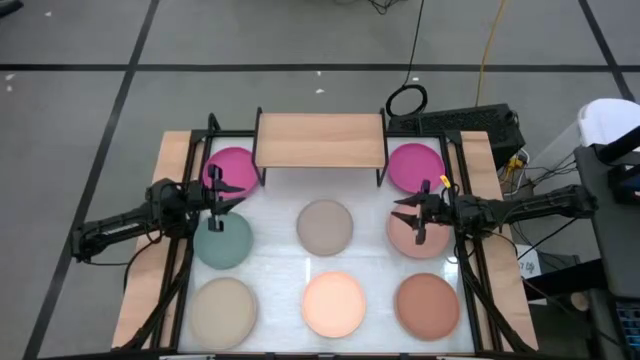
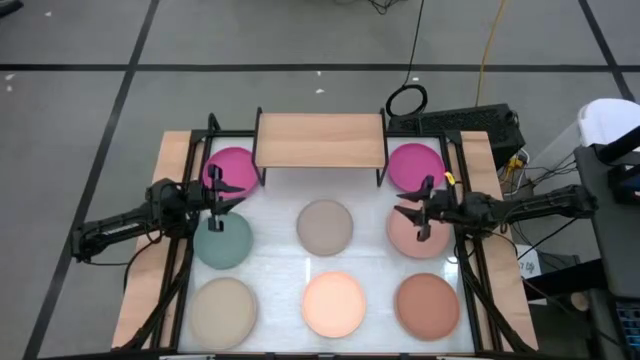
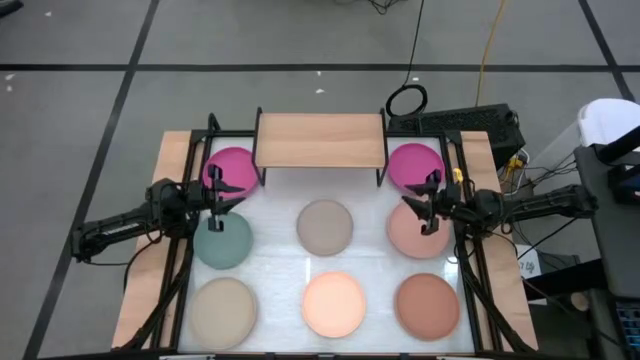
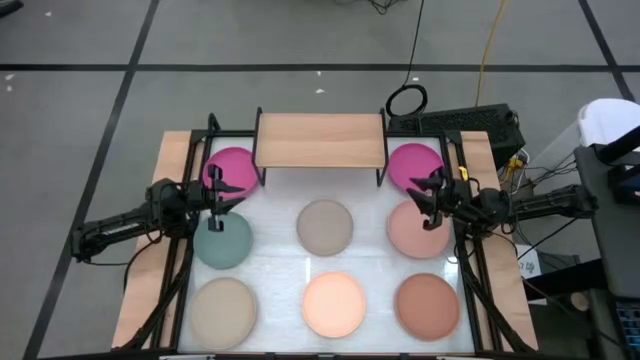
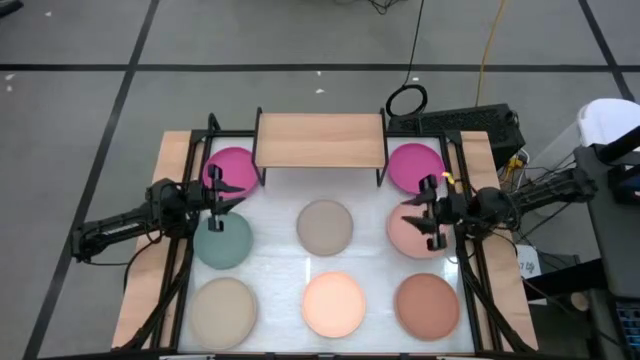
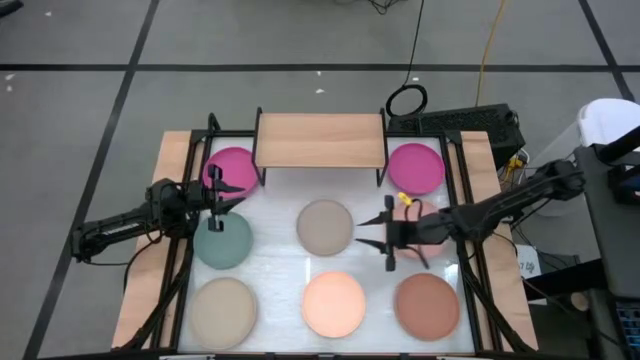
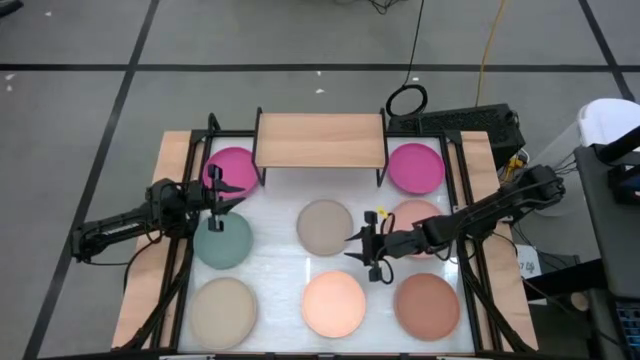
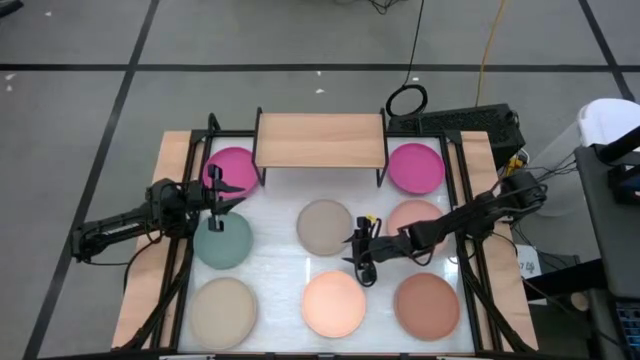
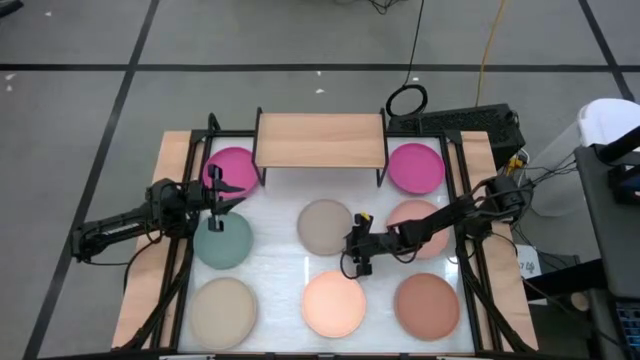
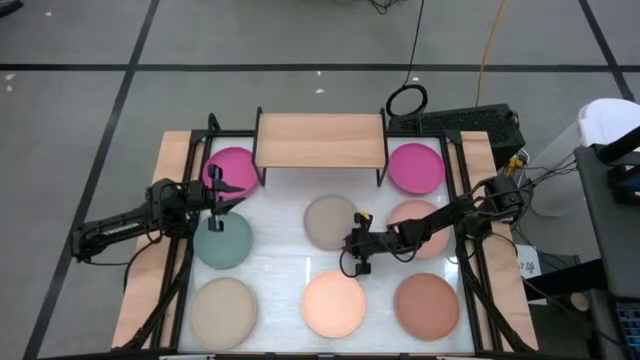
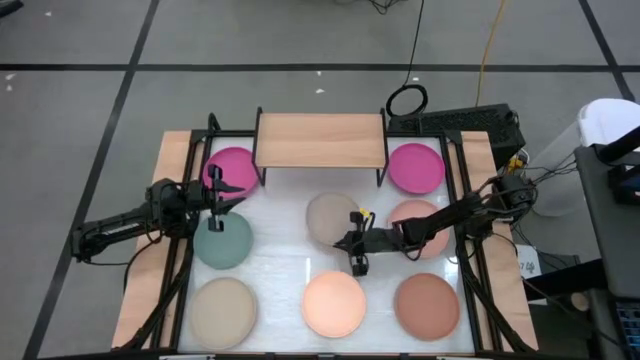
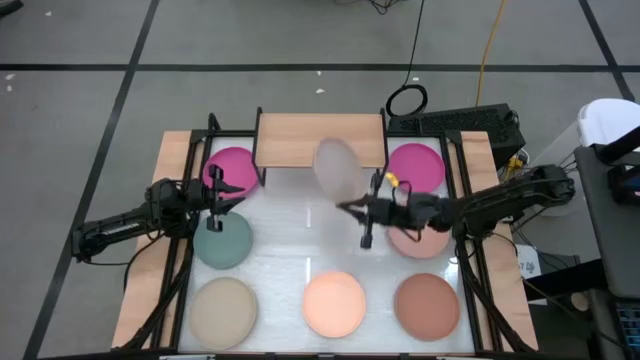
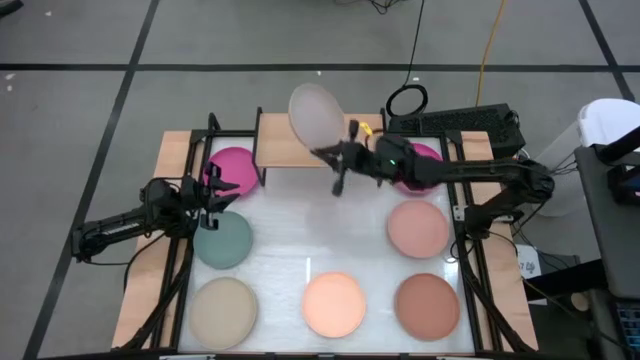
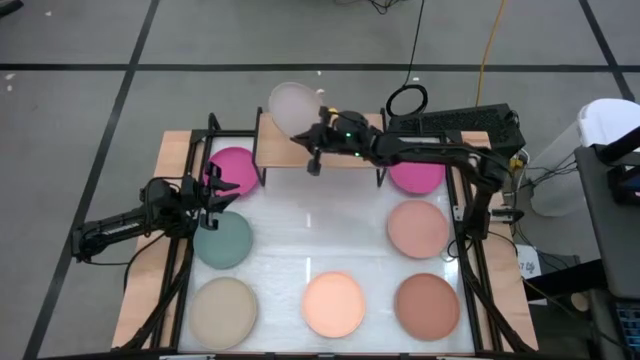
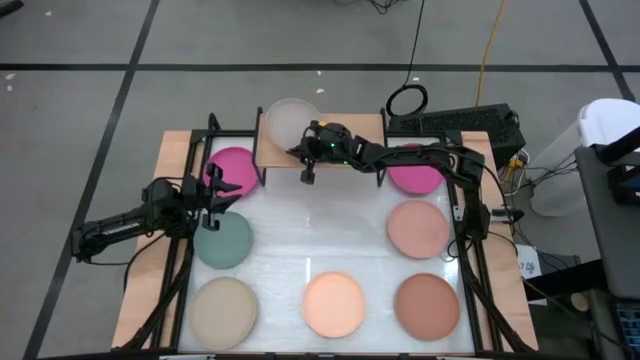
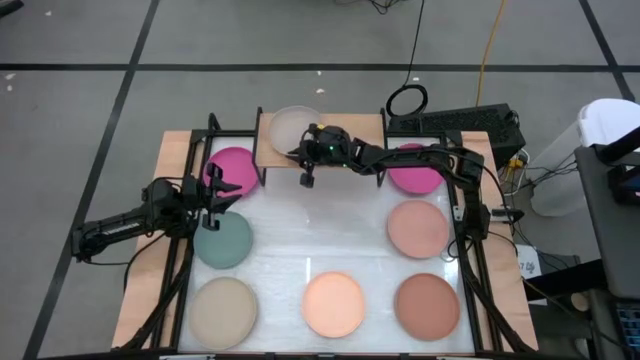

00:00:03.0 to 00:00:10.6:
Task: Place and stack plates onto a shelf
Put the gray plate on the shelf

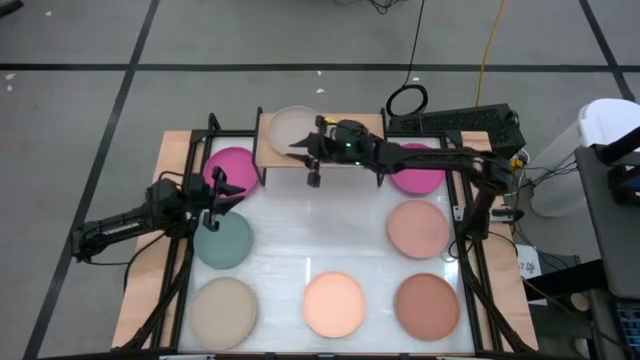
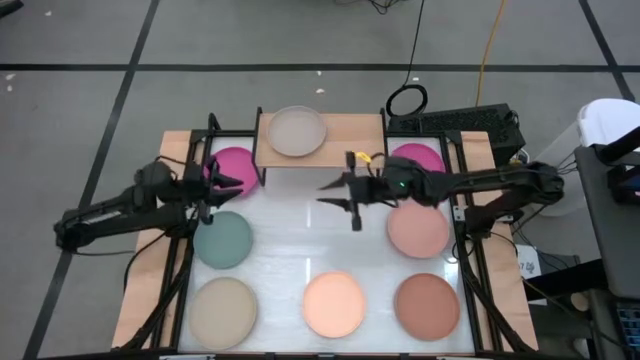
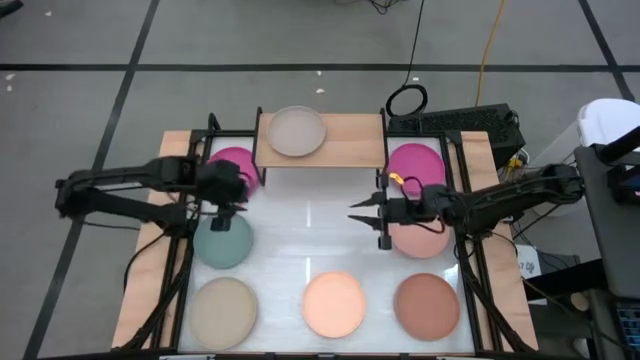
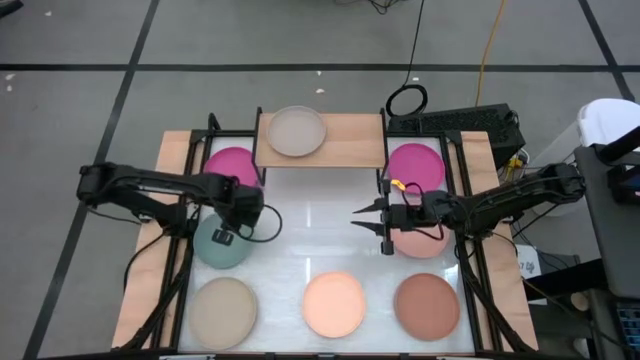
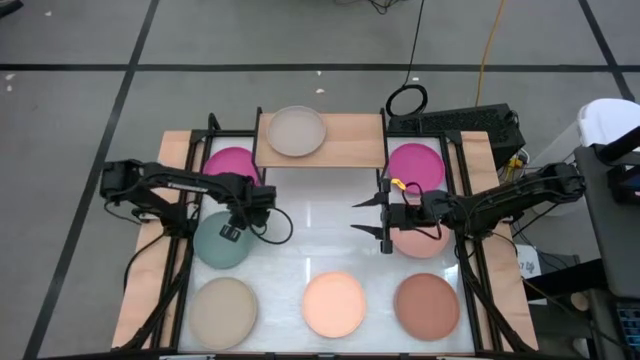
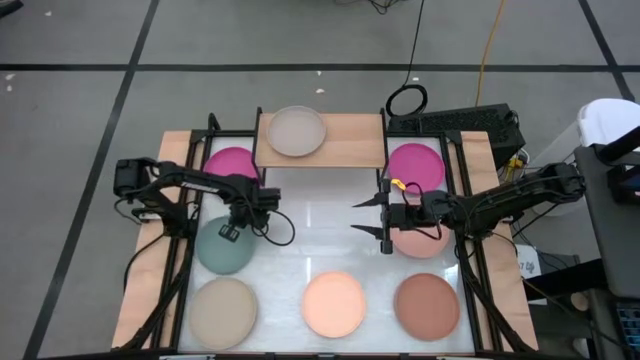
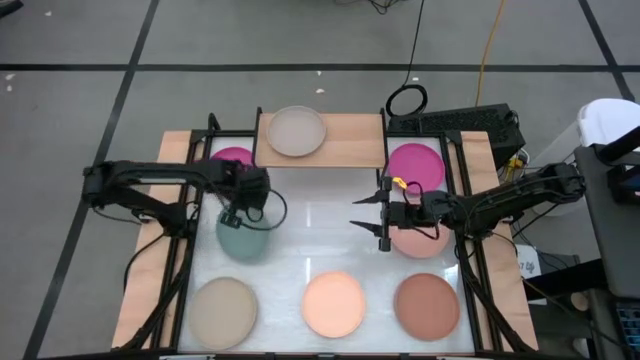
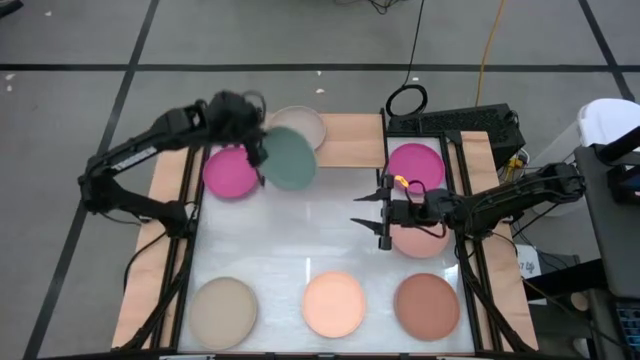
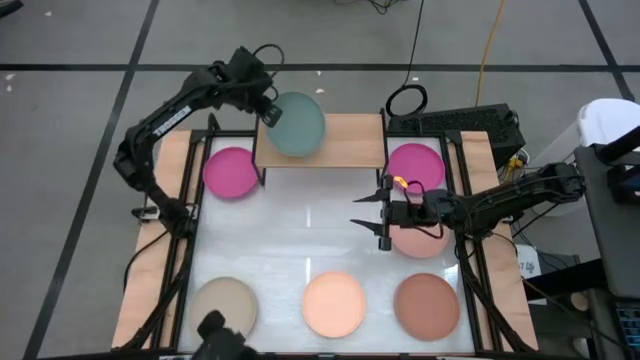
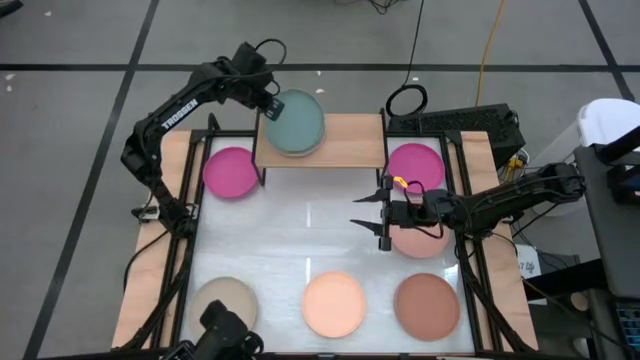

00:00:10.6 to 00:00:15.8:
Stack the light green plate on top of the gray plate on the shelf

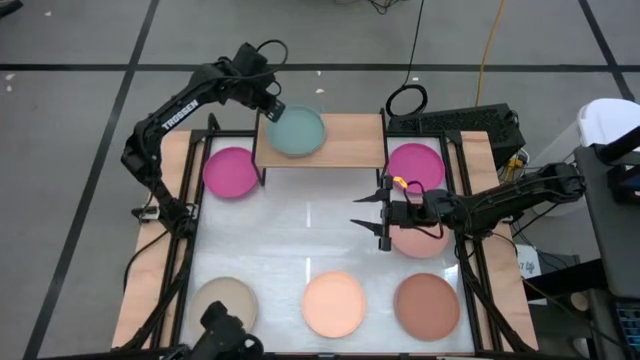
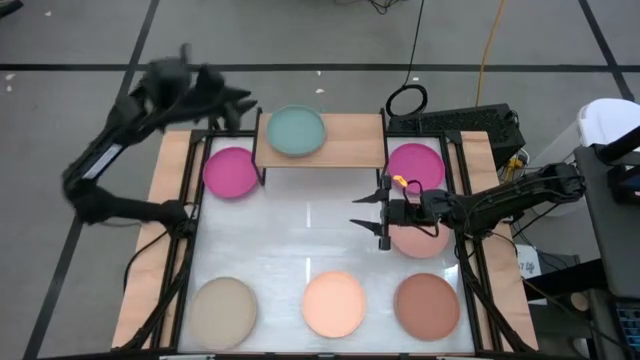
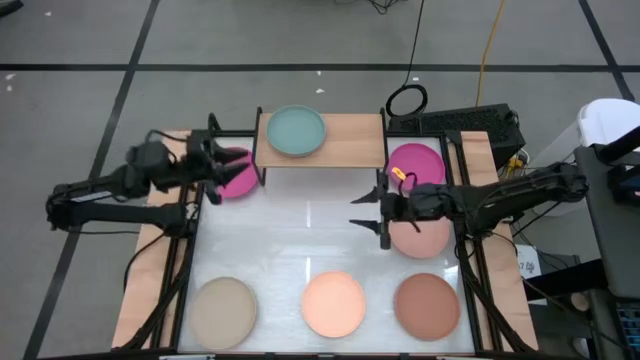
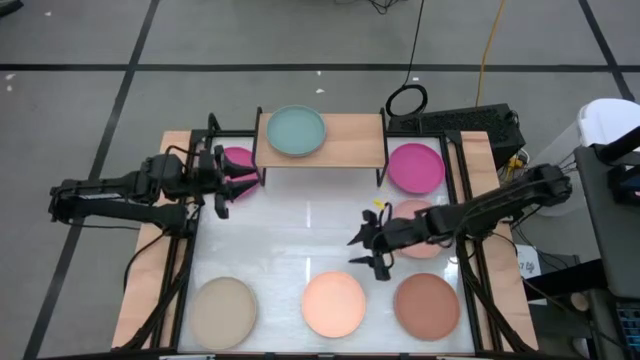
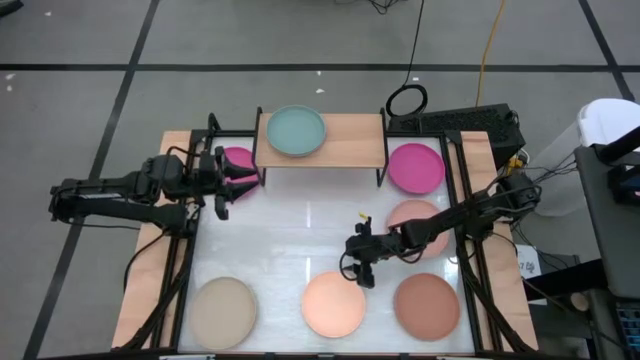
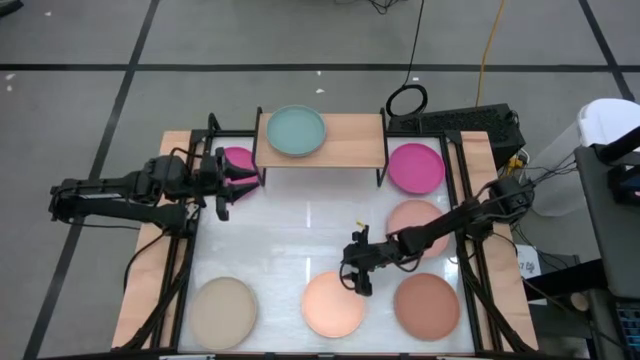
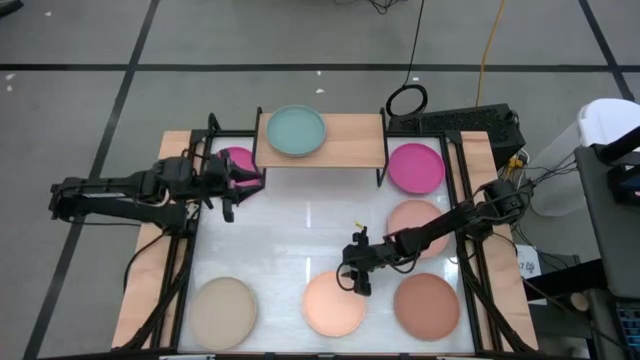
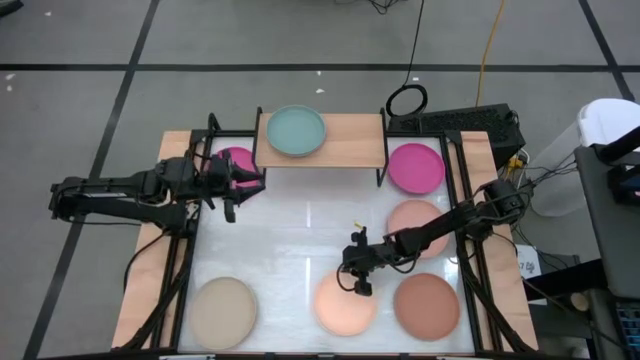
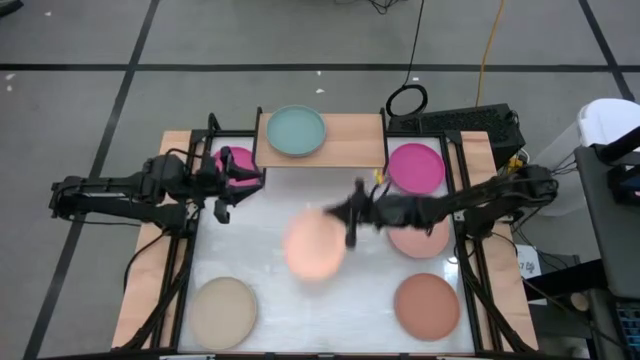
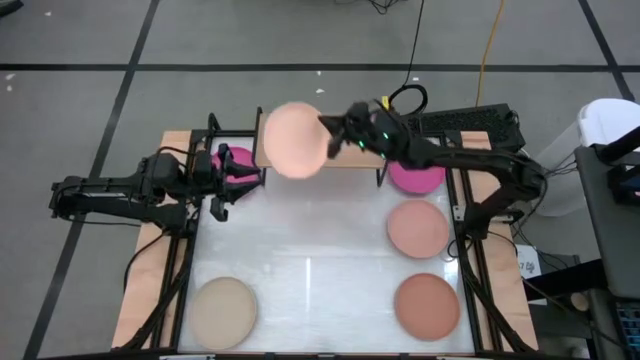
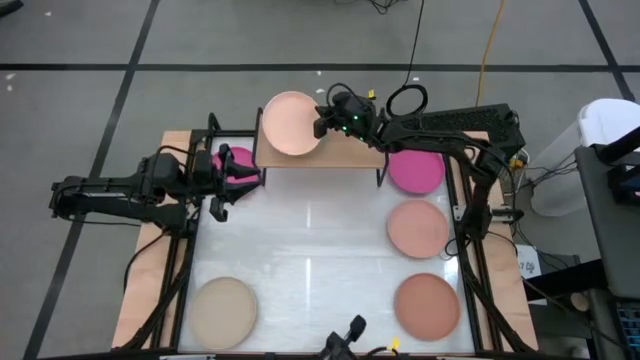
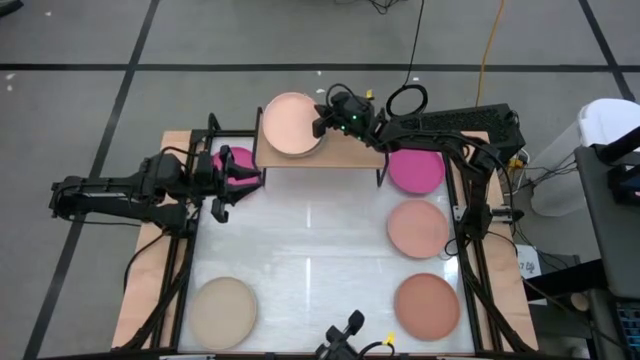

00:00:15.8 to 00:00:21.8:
Stack the light orange plate on top of the light green plate on the shelf

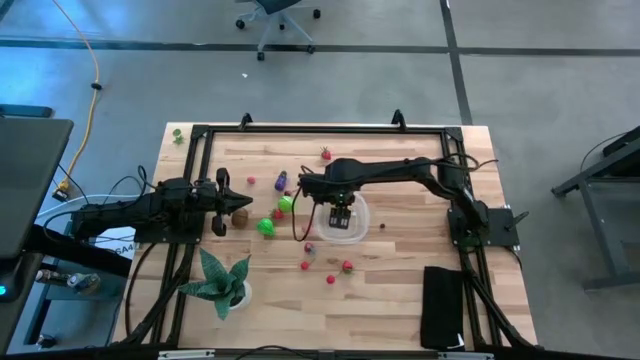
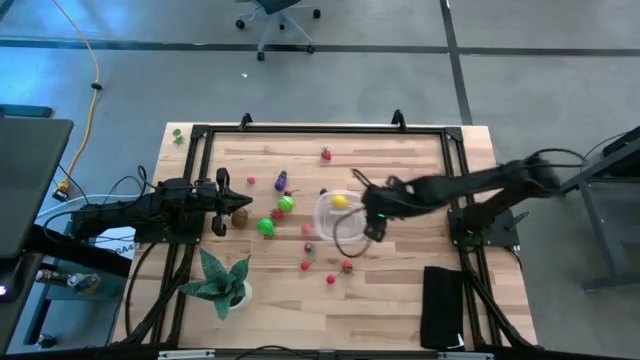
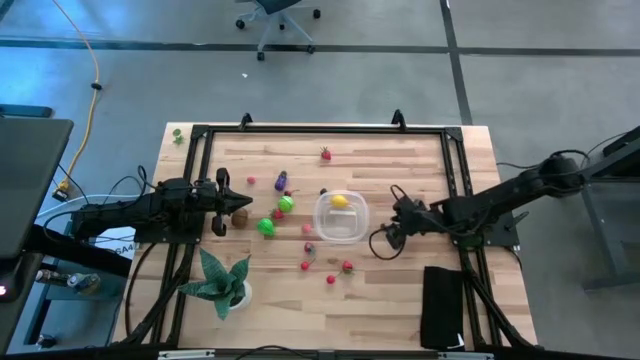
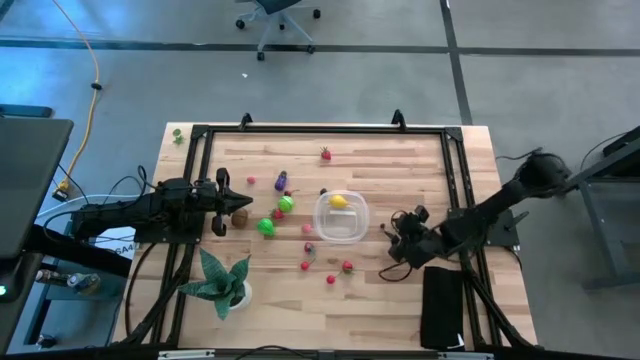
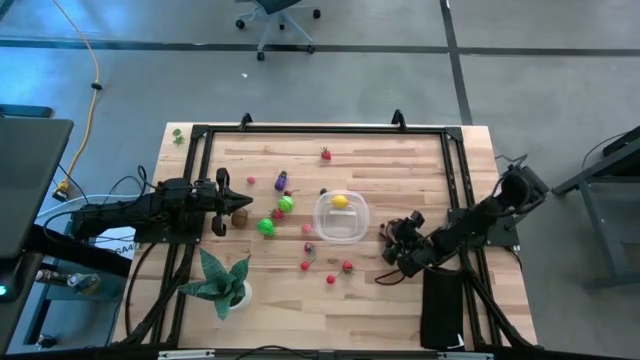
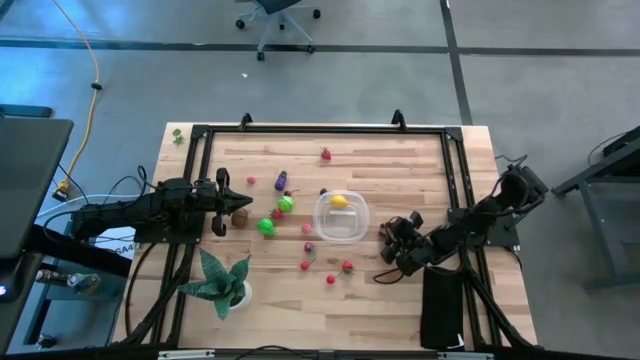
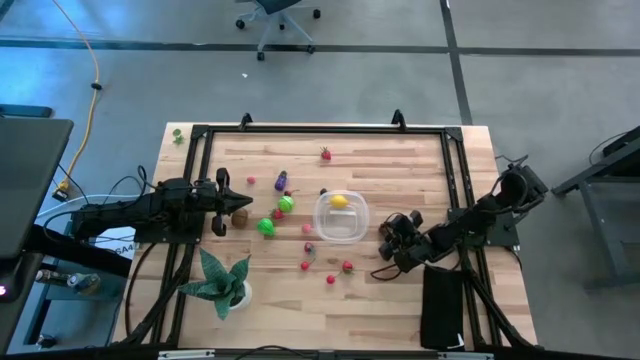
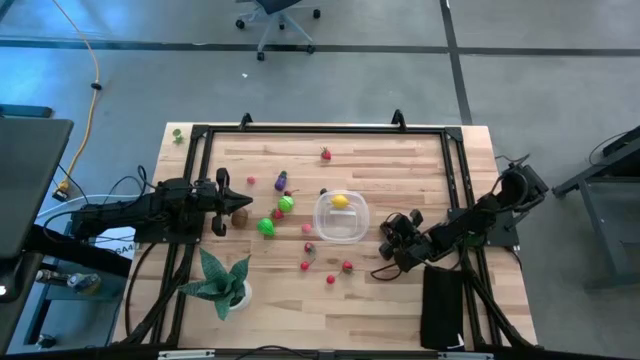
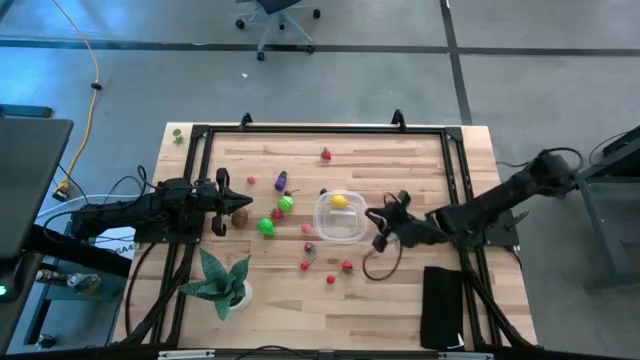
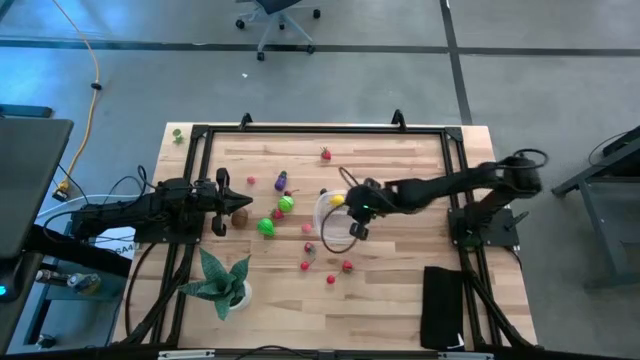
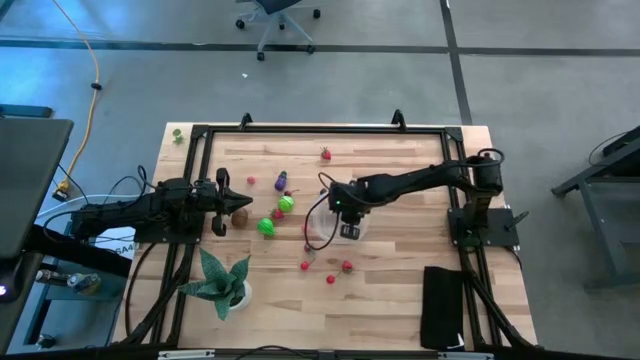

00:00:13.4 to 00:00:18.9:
Task: Pick and placing Produce into tupperware
Put the blueberry into the transparent container
